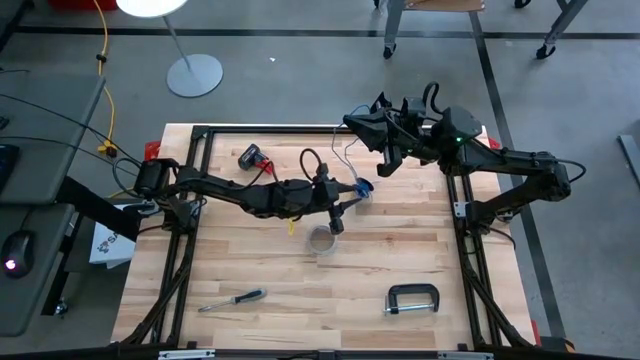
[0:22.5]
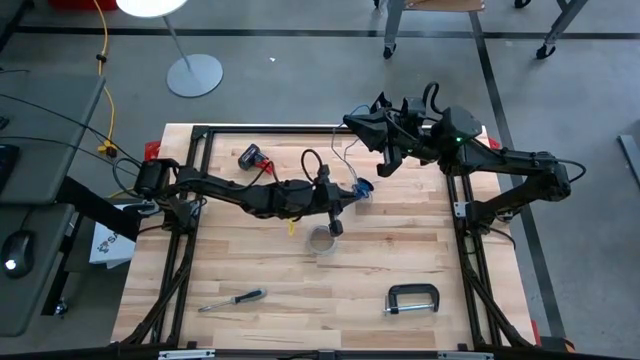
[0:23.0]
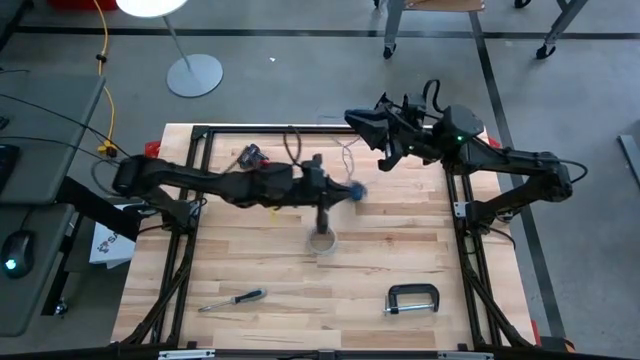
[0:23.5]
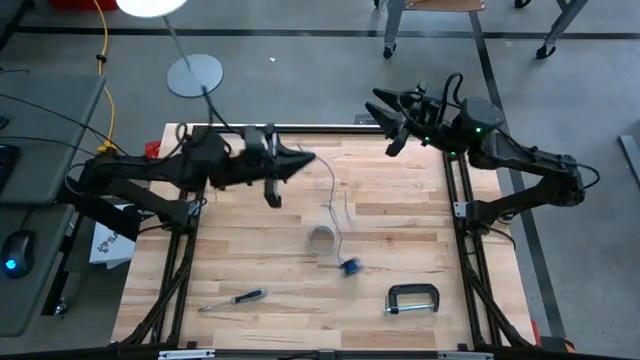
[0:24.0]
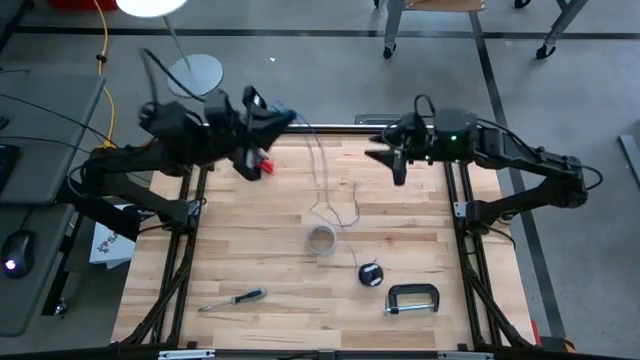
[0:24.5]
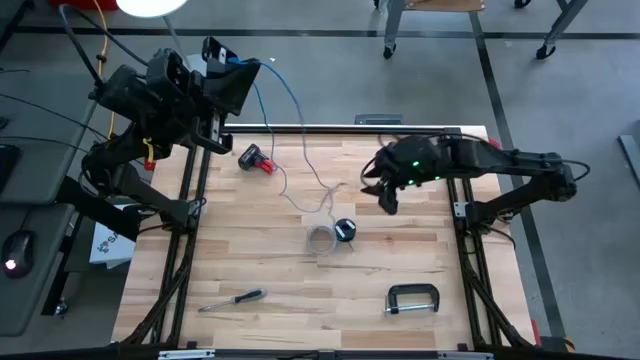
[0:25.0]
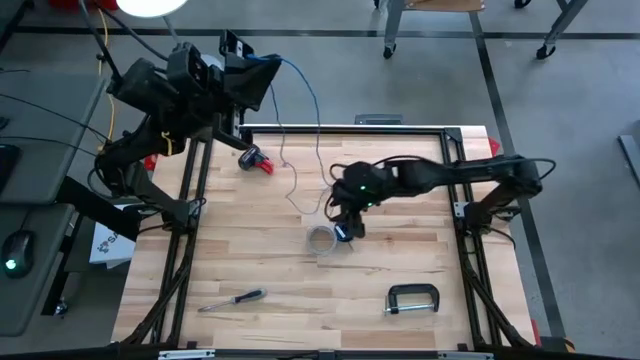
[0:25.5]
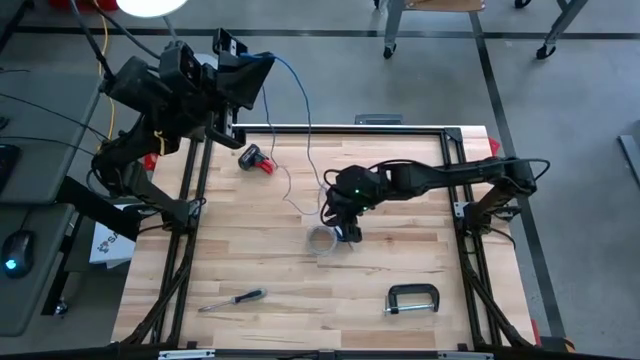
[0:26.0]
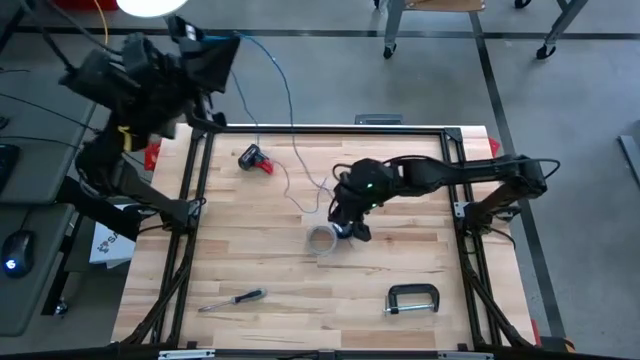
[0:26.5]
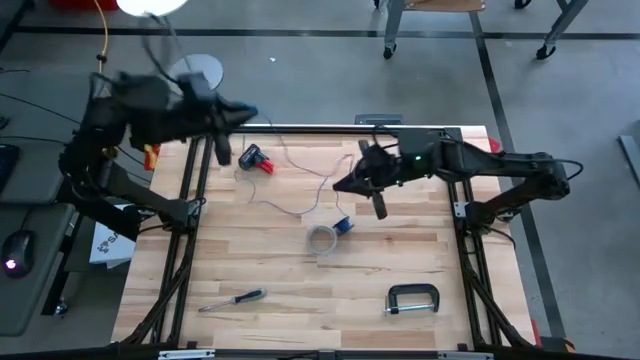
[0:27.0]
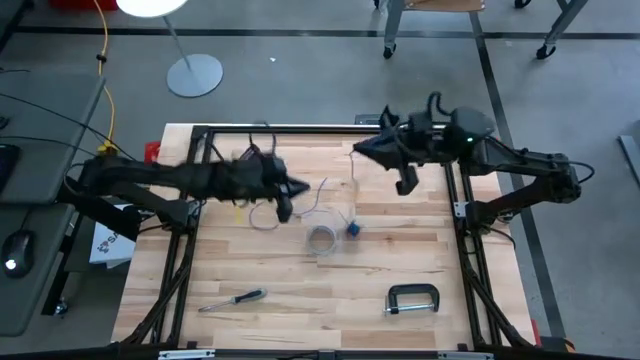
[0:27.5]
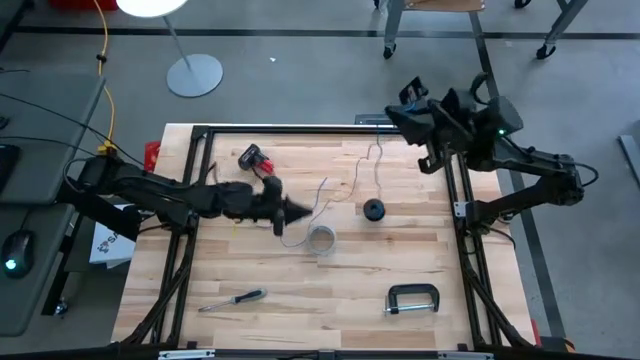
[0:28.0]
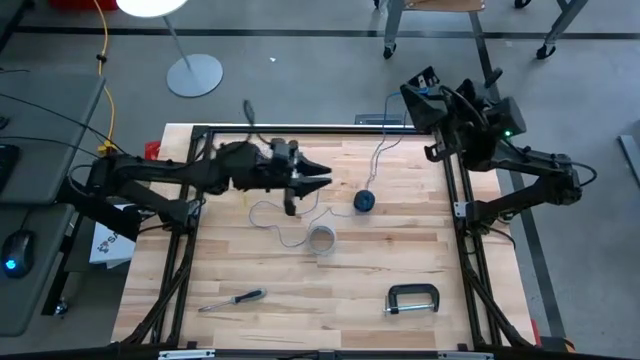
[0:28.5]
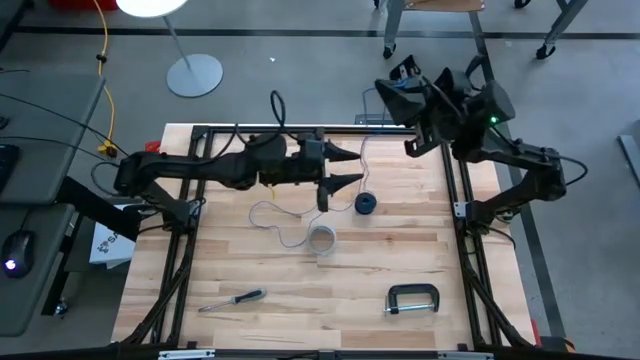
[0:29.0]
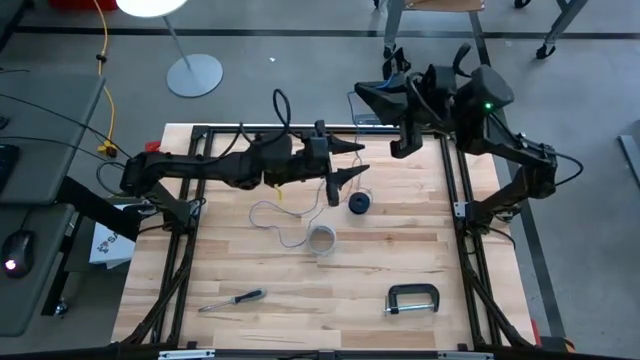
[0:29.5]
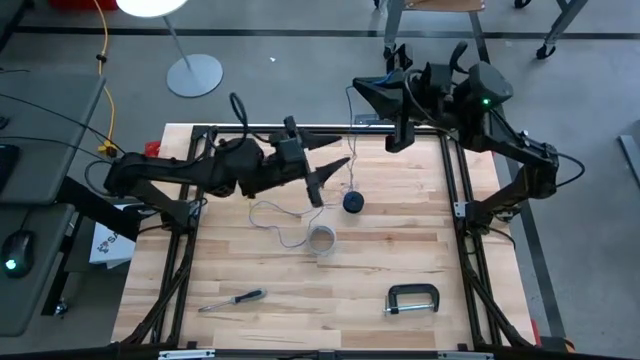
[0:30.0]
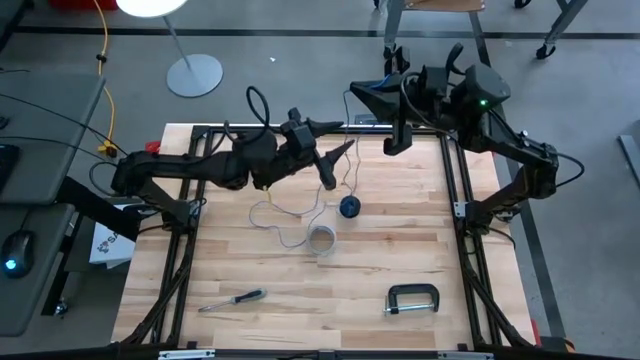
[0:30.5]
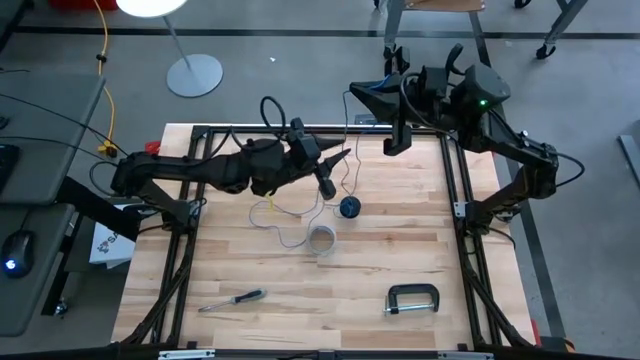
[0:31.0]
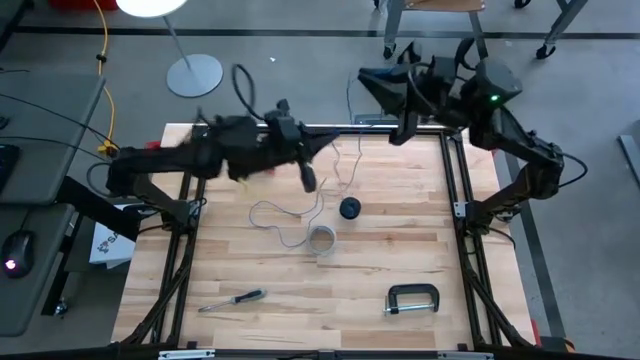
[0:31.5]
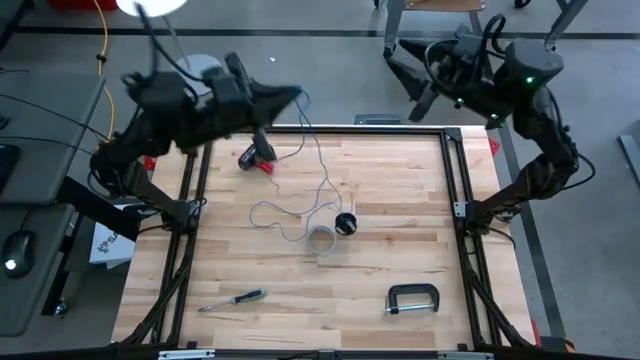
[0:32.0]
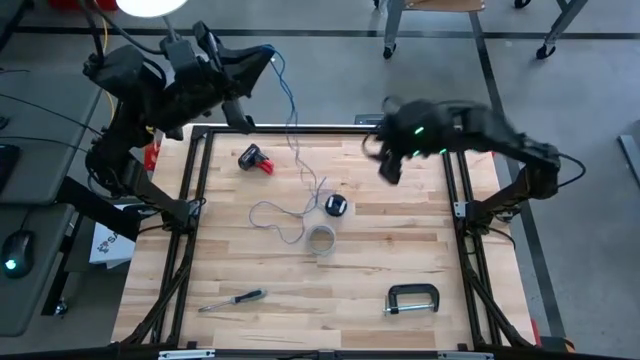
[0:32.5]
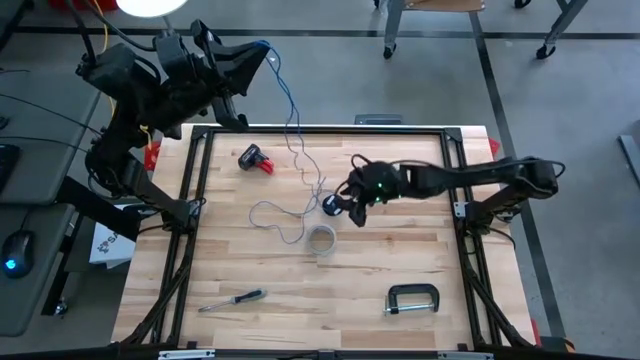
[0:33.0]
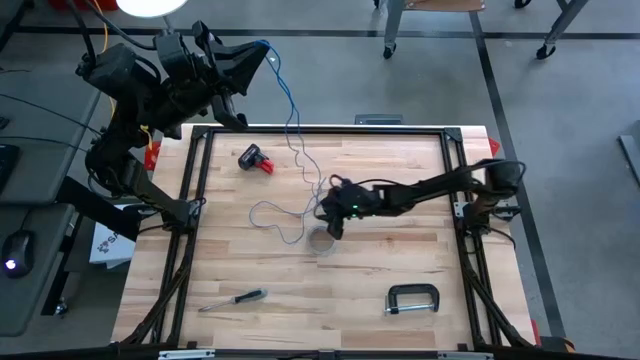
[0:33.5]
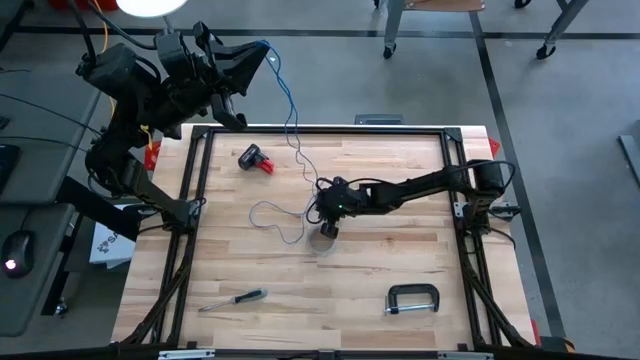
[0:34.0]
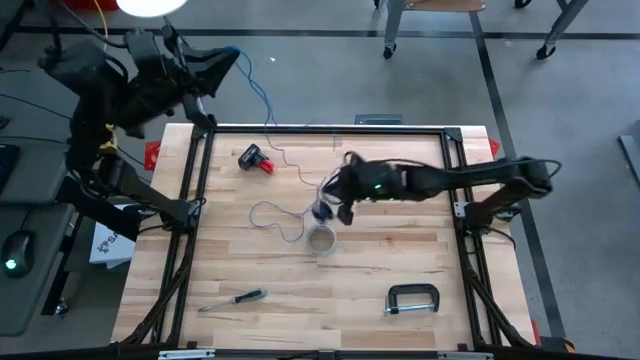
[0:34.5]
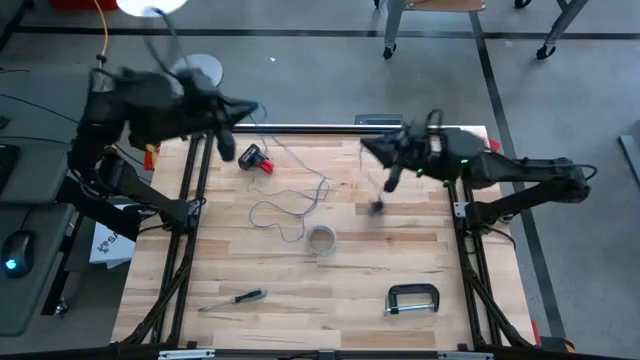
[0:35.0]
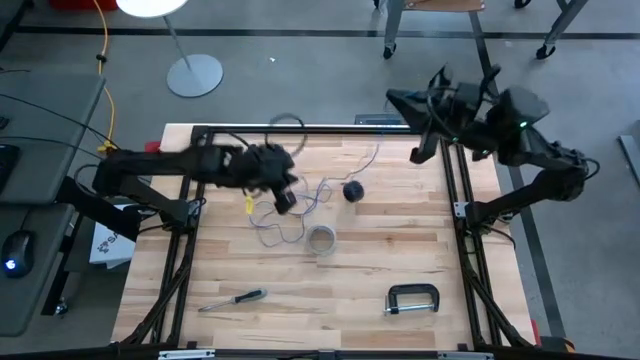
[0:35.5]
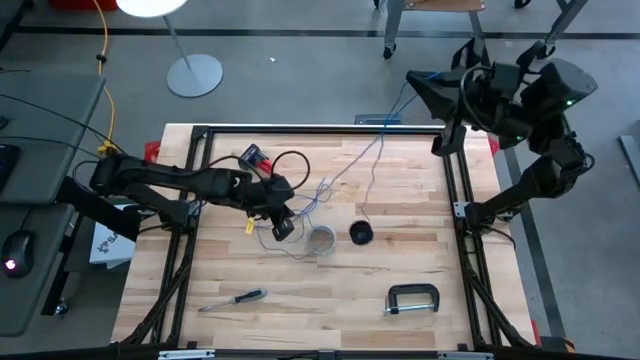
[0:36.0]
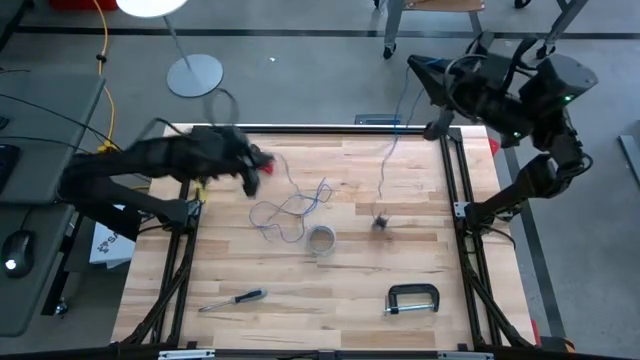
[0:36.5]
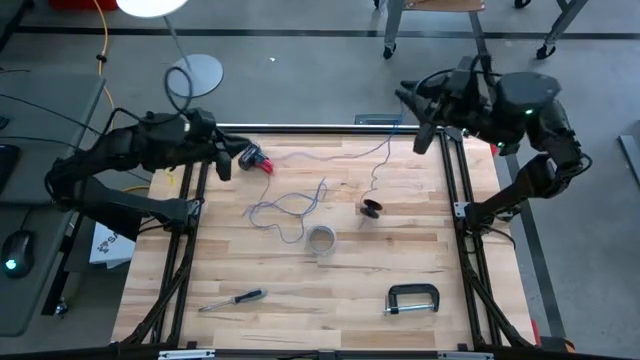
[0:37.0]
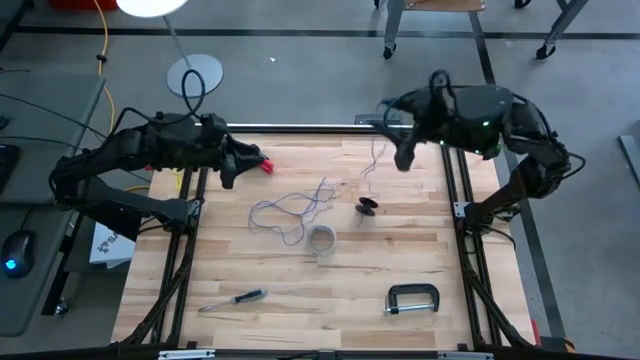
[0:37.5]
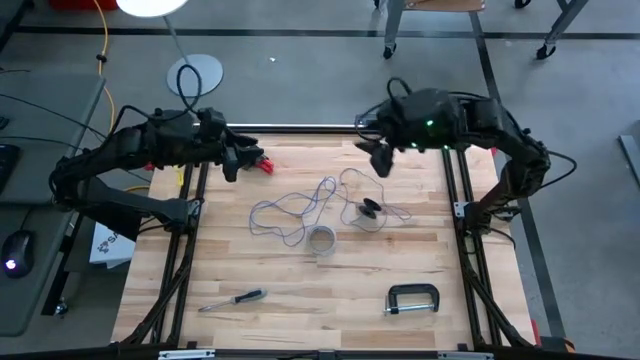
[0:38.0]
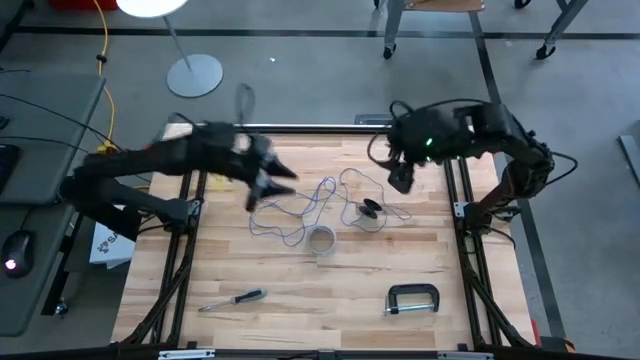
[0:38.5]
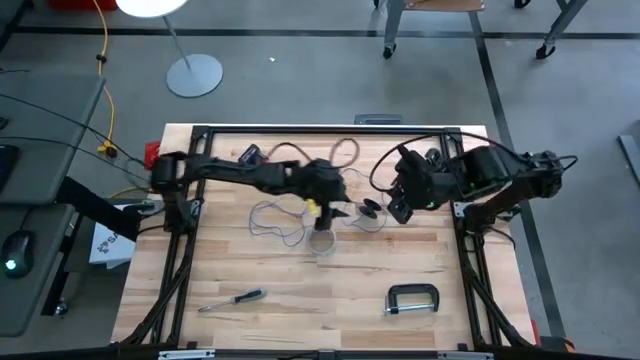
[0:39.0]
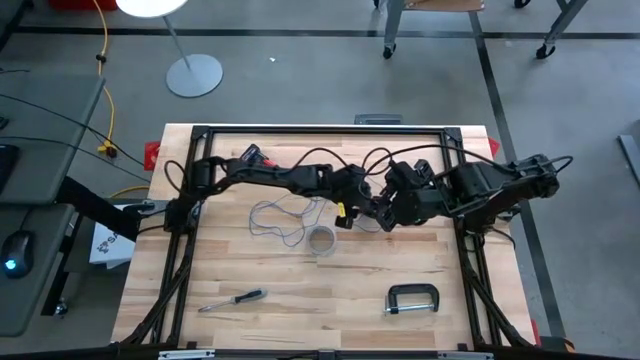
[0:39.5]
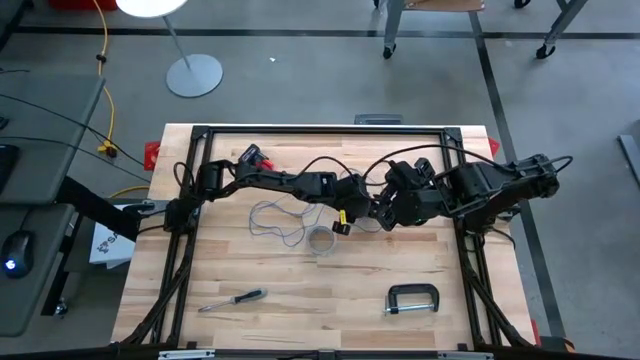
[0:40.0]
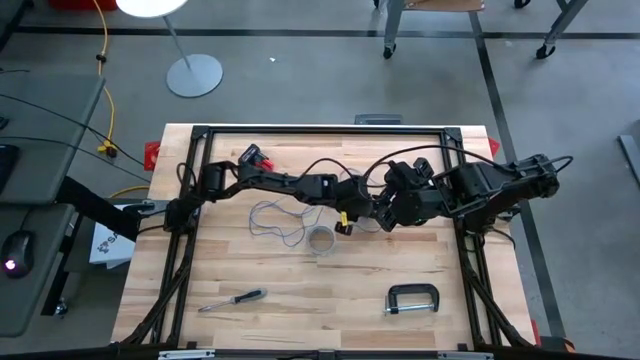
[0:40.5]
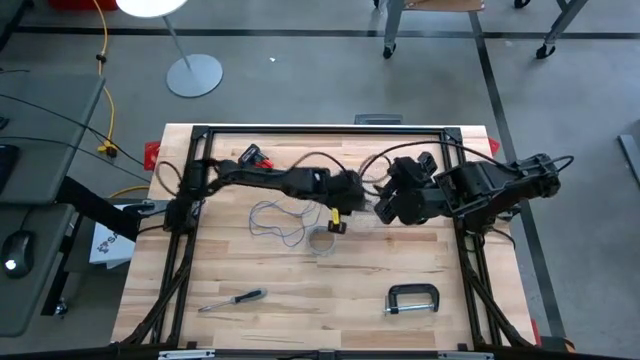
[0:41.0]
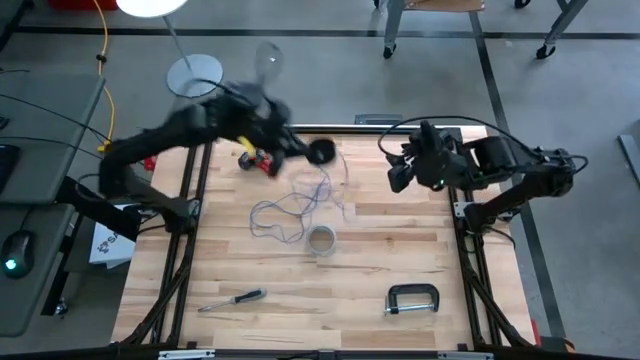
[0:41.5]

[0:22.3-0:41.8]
Task: Coil cords
Uncoil the blue wire from the spool
